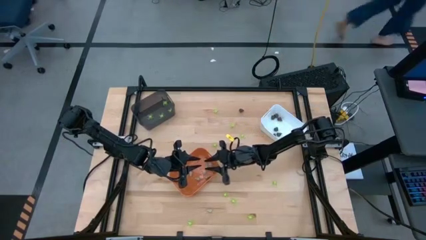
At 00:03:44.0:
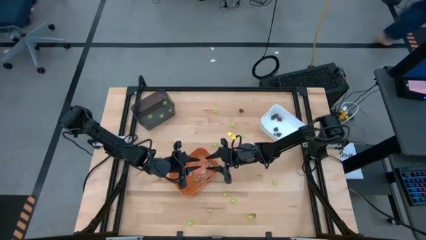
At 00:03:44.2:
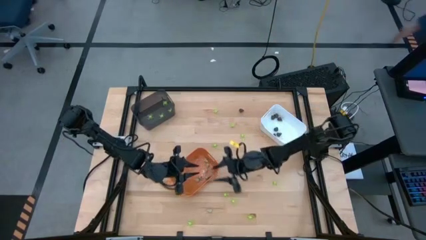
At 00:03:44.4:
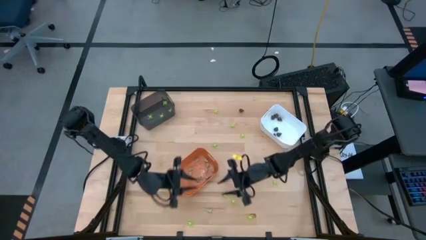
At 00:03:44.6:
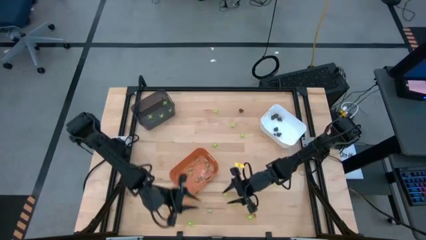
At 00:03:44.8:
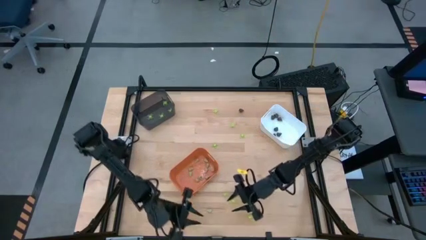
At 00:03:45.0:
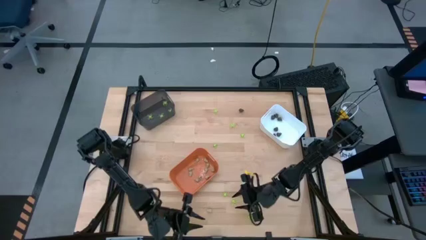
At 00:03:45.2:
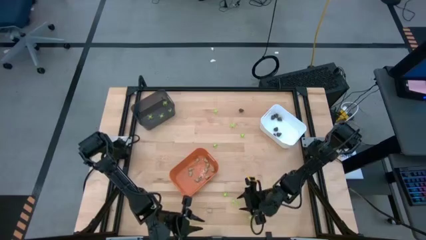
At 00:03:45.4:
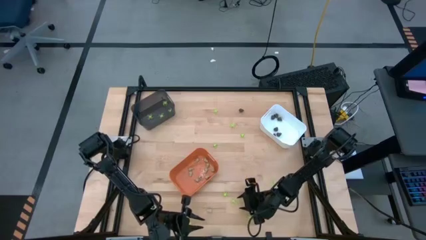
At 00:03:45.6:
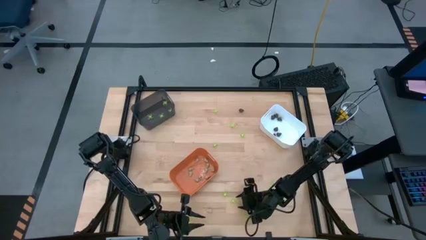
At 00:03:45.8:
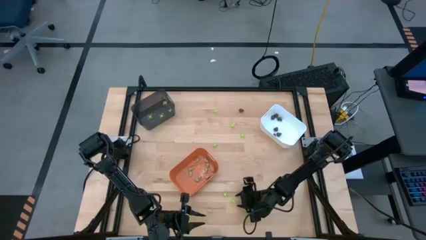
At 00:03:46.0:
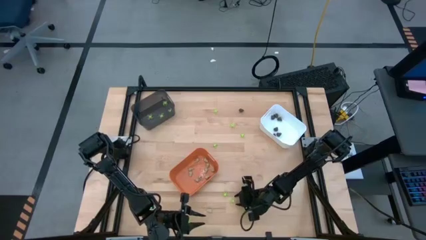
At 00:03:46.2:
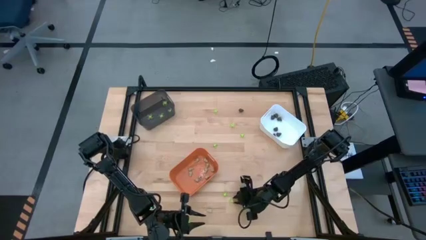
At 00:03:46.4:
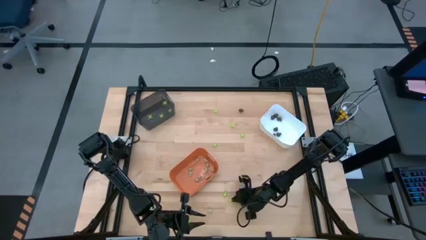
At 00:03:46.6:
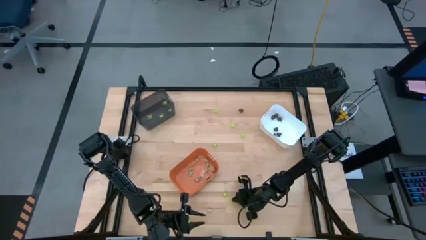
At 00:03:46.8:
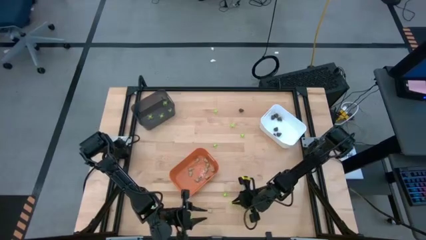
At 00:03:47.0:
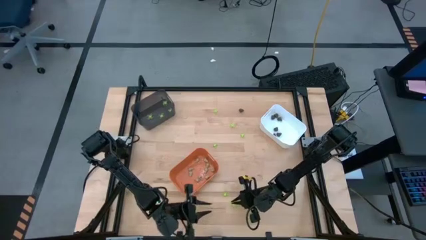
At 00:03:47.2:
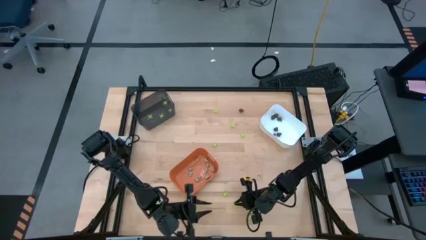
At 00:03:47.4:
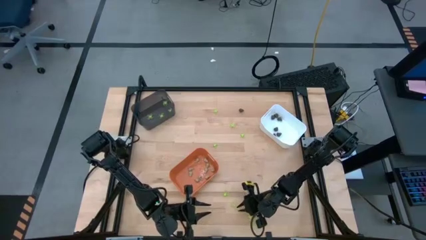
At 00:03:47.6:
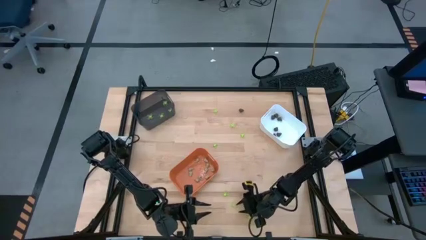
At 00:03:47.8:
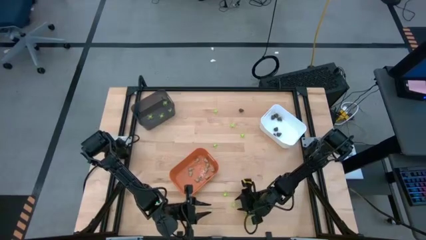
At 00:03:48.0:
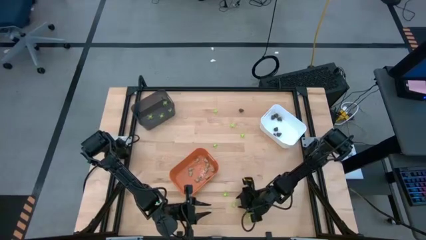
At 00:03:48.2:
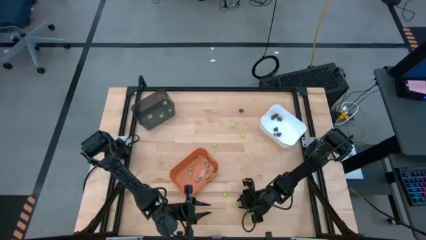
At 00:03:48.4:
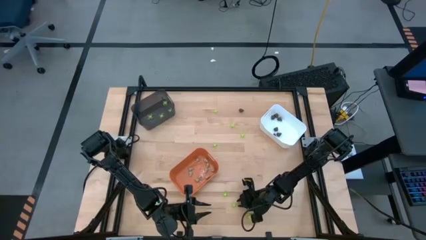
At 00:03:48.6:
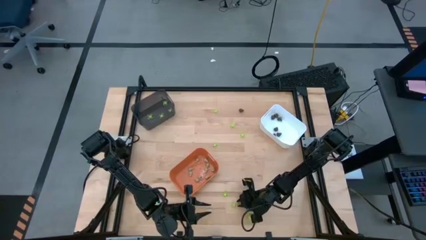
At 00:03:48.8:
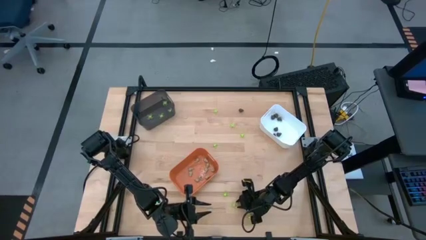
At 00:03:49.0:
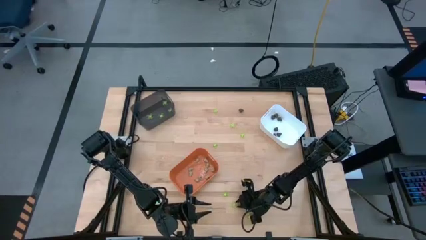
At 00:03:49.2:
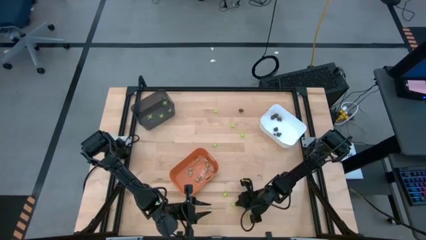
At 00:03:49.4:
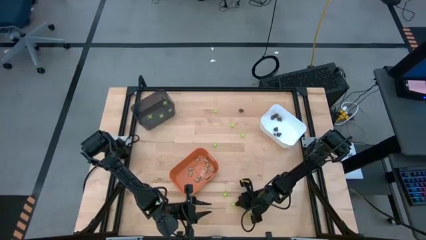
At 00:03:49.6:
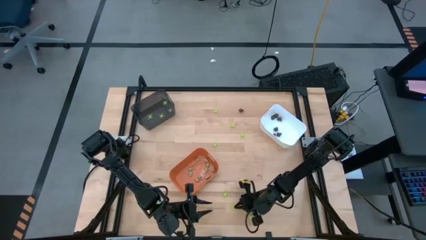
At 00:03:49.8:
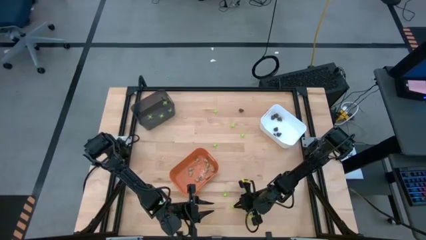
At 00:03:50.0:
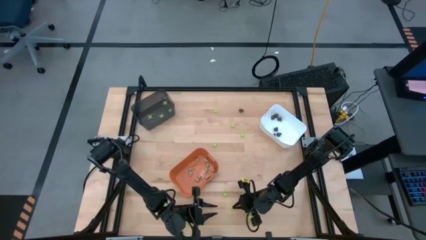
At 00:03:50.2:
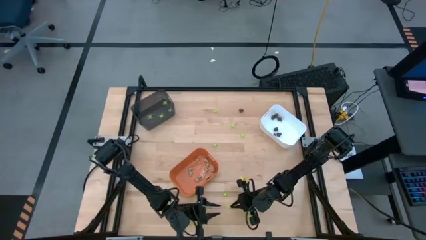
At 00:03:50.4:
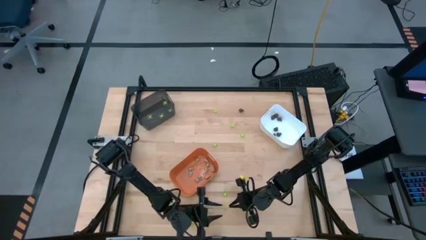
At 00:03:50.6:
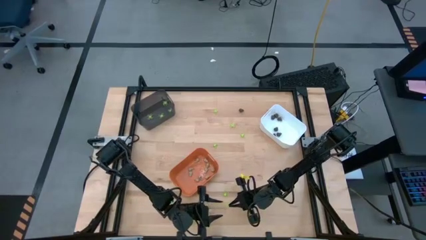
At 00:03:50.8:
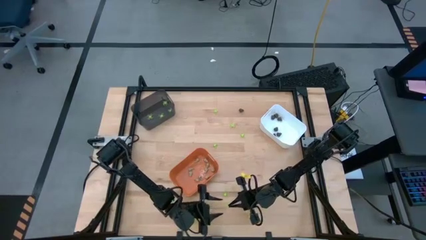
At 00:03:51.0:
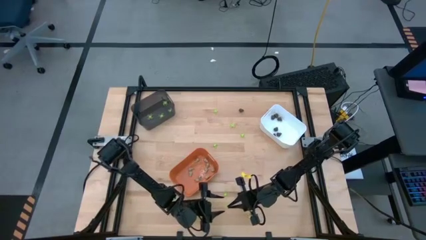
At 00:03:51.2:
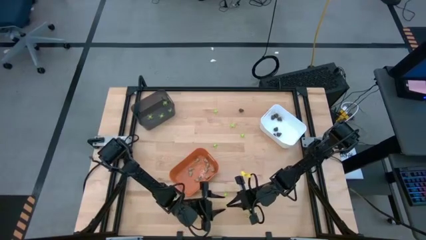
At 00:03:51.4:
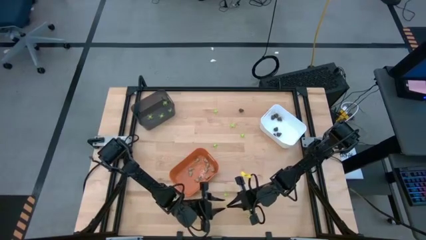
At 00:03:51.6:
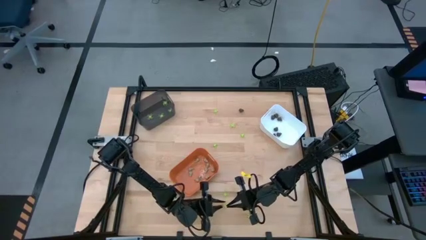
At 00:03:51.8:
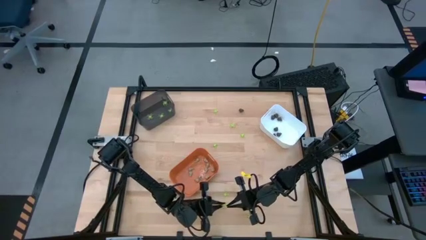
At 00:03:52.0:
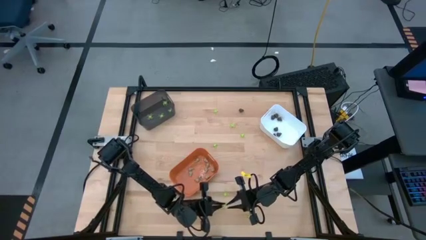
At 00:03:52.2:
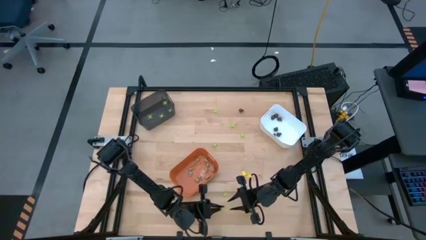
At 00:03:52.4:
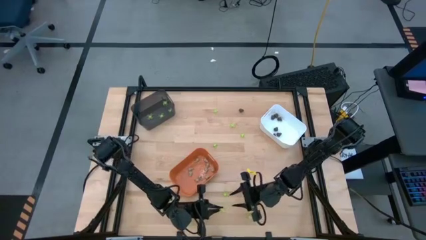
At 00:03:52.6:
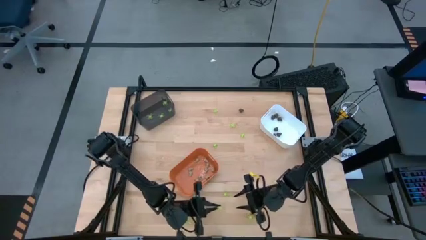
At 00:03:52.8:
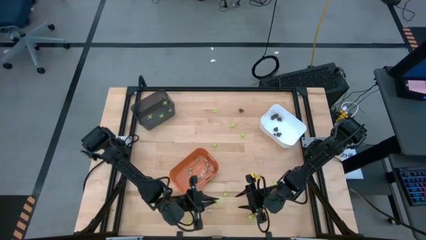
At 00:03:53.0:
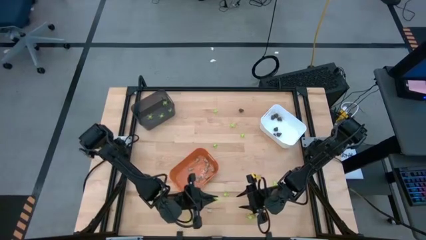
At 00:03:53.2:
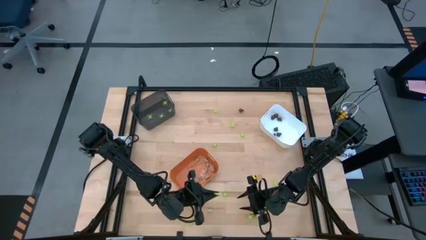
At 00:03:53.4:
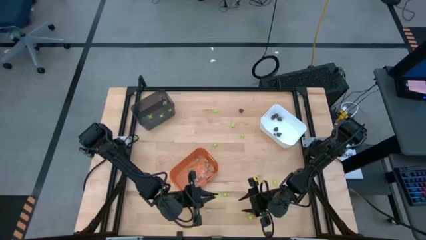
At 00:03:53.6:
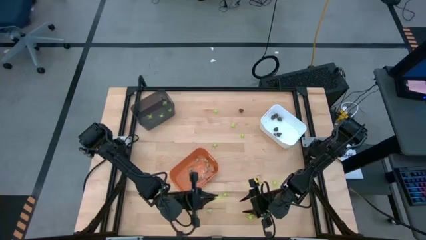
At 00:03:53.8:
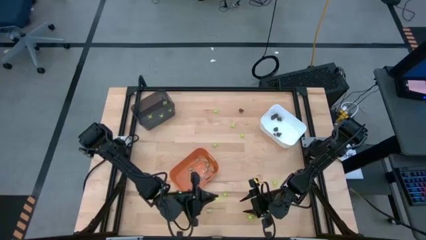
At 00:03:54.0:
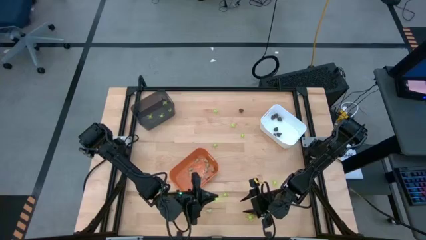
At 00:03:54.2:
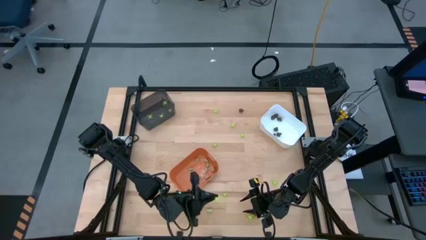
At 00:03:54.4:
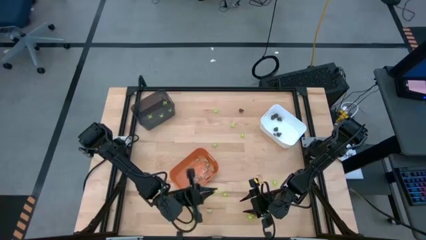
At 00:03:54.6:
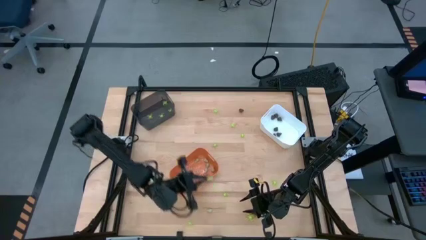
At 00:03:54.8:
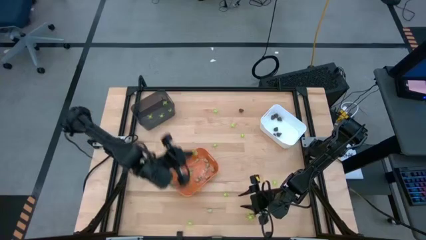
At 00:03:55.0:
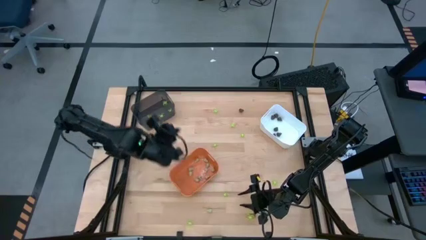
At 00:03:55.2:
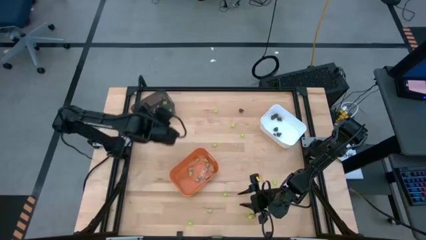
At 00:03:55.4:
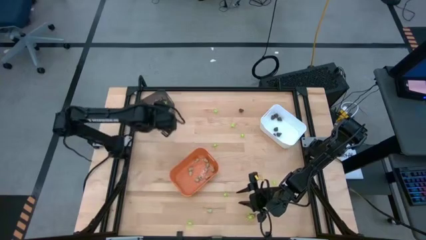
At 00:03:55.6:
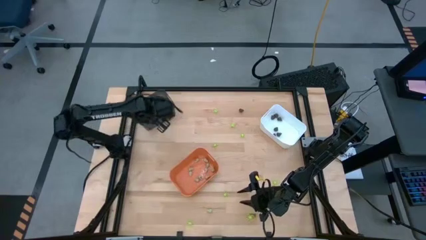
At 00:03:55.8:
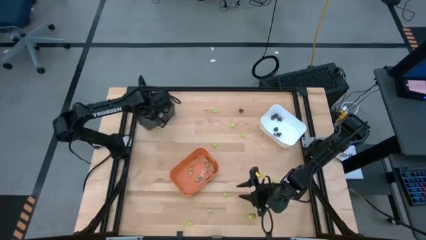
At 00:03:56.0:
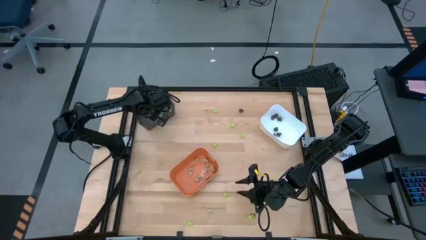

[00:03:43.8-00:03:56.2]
Task: Sort Halloween decoration
Put the green spider toy into the black bin

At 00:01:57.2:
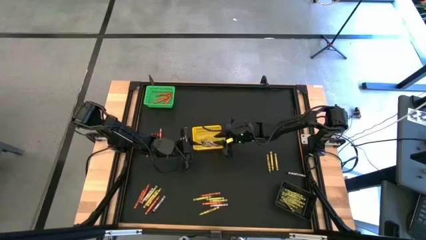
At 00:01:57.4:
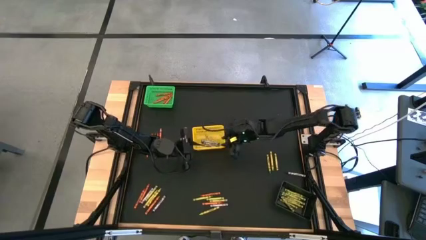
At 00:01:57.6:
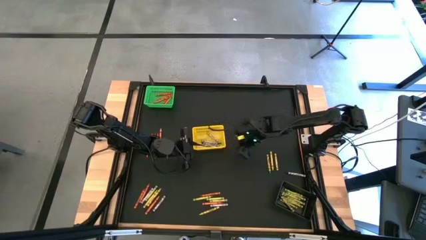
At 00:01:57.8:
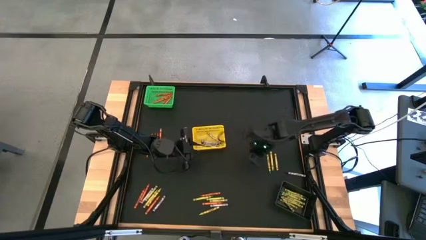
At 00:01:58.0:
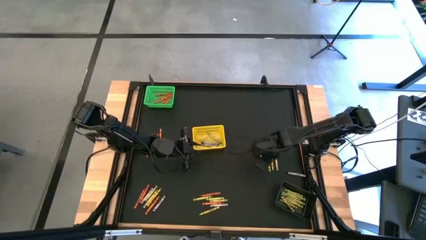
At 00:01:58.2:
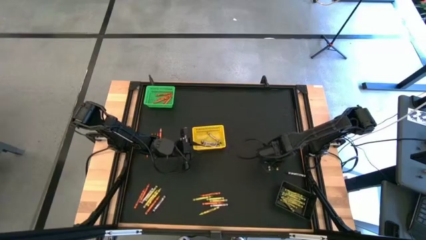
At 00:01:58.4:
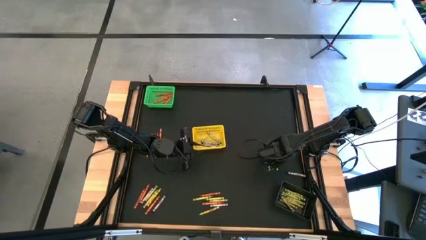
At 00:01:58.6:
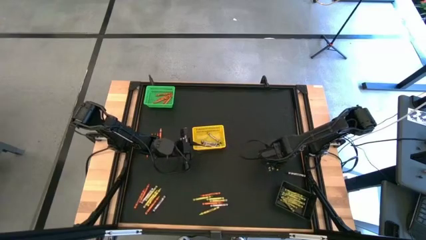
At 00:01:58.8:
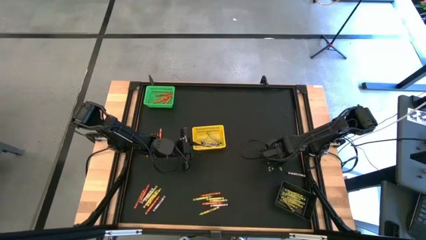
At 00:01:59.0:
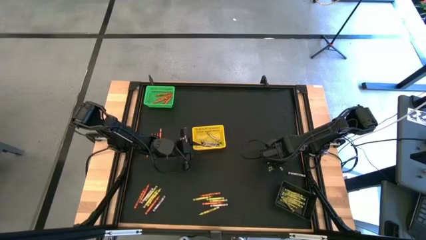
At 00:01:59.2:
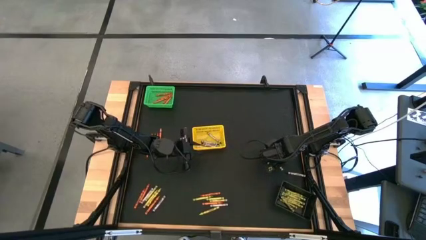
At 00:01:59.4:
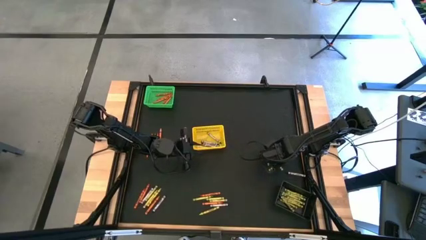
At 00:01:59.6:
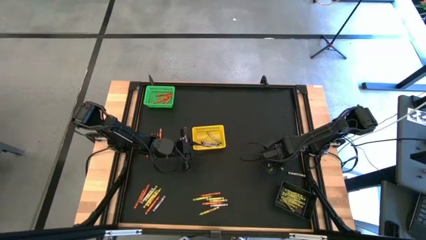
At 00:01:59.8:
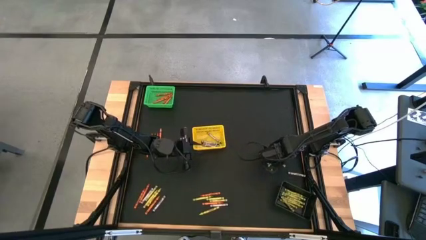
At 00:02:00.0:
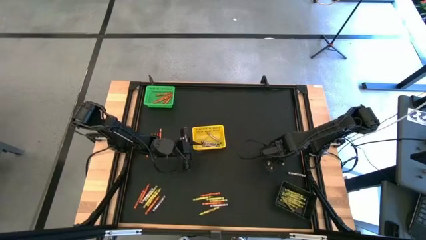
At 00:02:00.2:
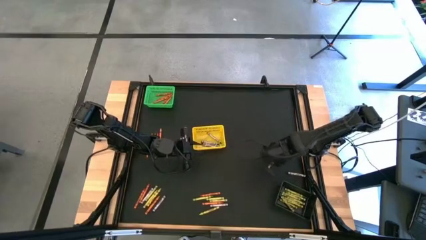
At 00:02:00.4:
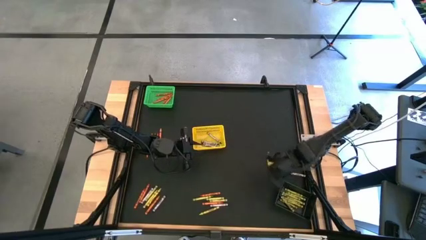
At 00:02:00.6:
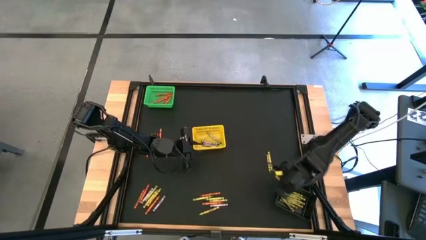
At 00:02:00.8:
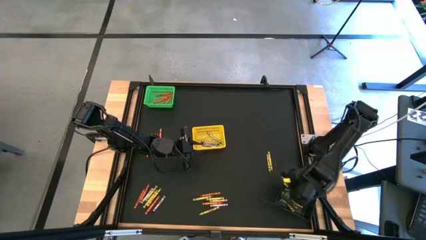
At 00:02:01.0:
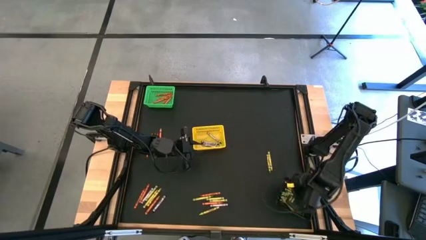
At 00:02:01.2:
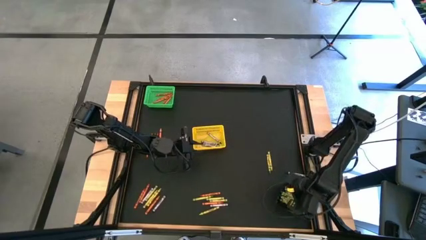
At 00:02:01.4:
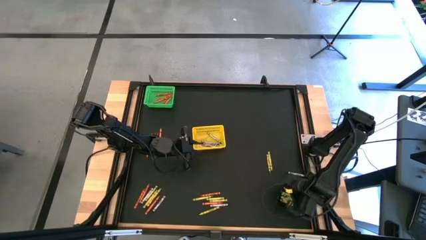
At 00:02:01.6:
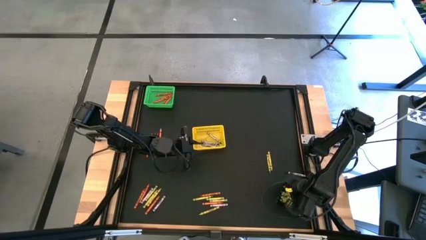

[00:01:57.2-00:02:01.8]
Task: Sort crayons
Put the green crayon into the black bin
